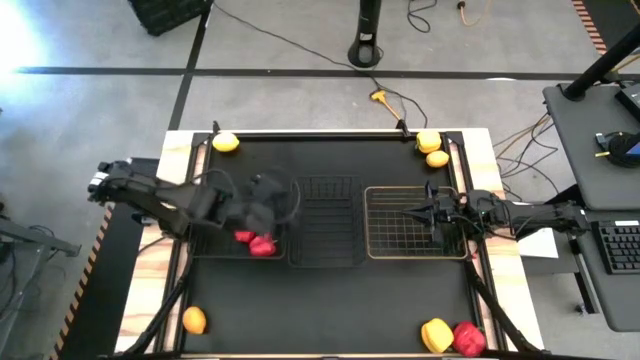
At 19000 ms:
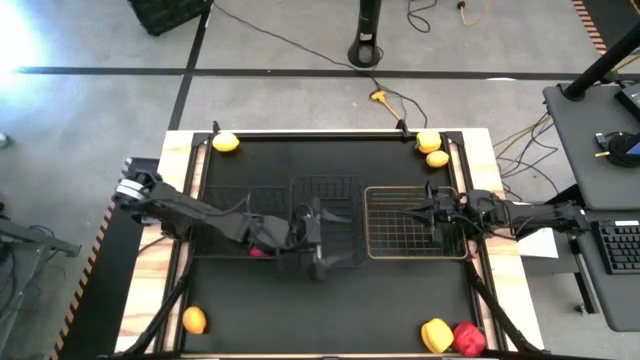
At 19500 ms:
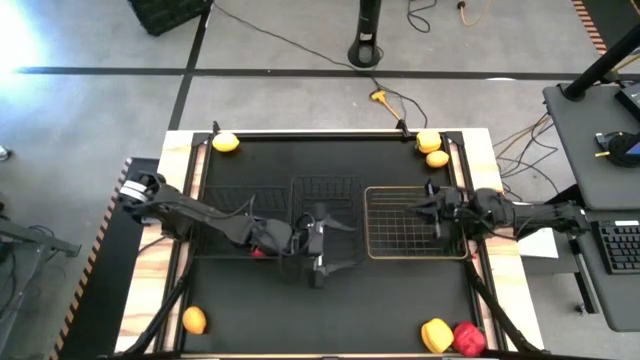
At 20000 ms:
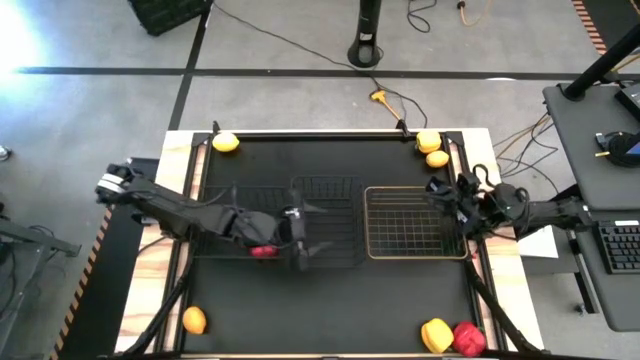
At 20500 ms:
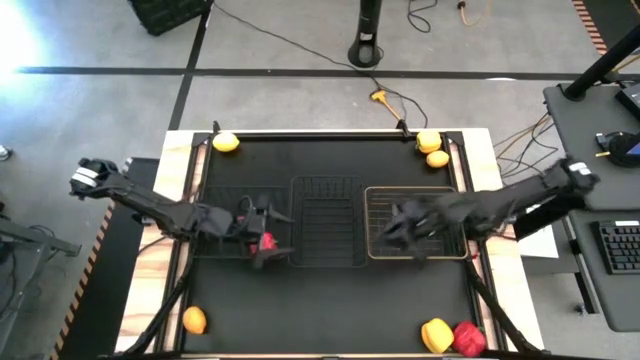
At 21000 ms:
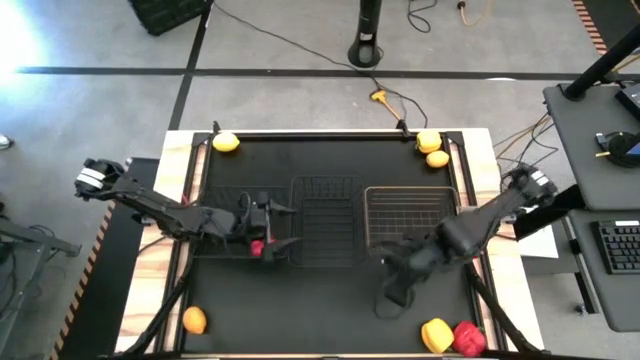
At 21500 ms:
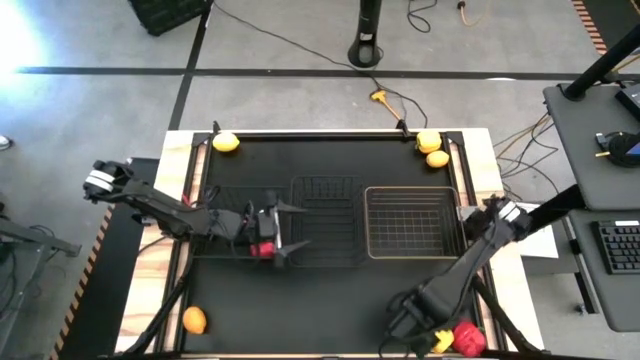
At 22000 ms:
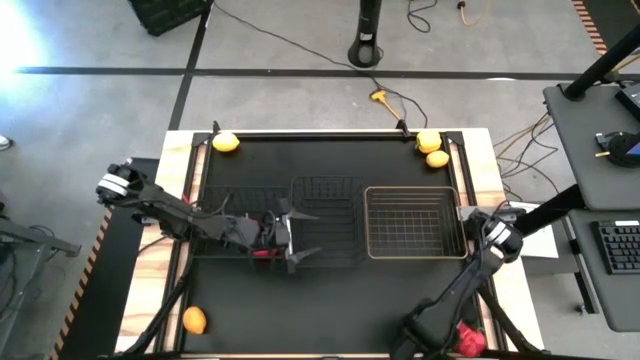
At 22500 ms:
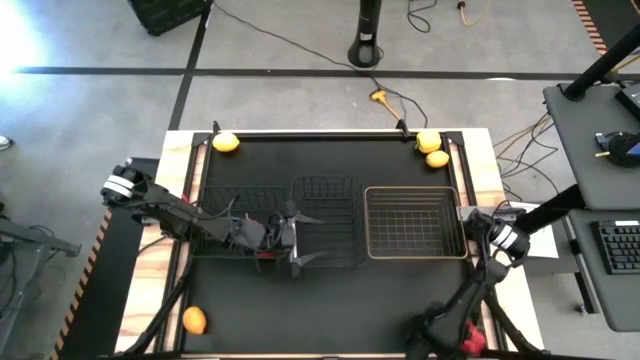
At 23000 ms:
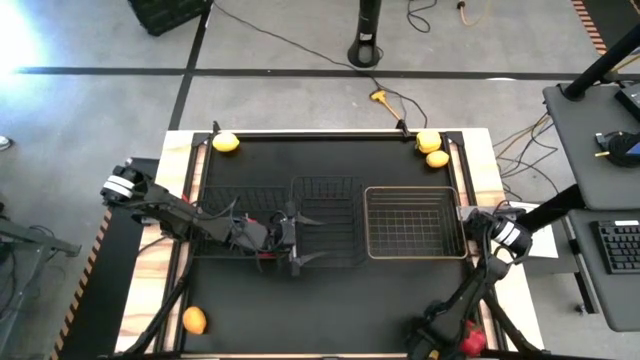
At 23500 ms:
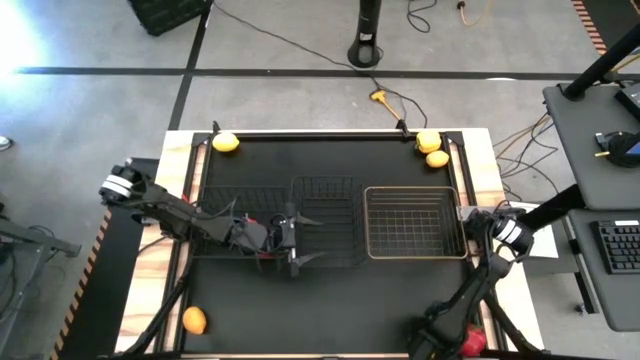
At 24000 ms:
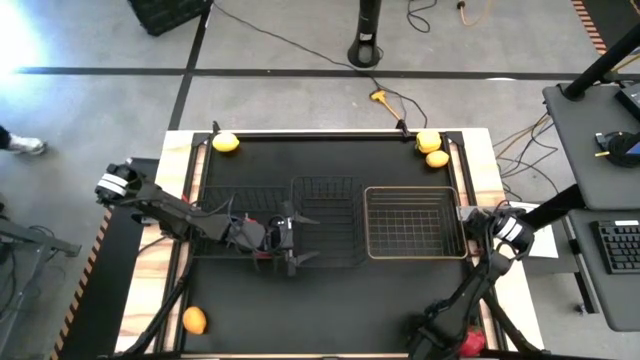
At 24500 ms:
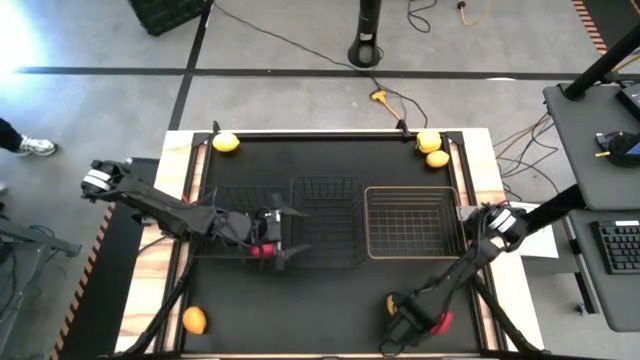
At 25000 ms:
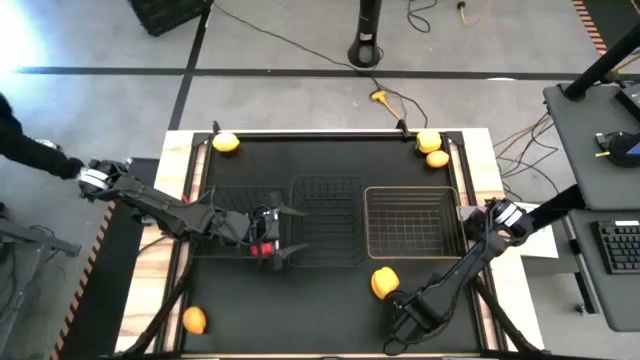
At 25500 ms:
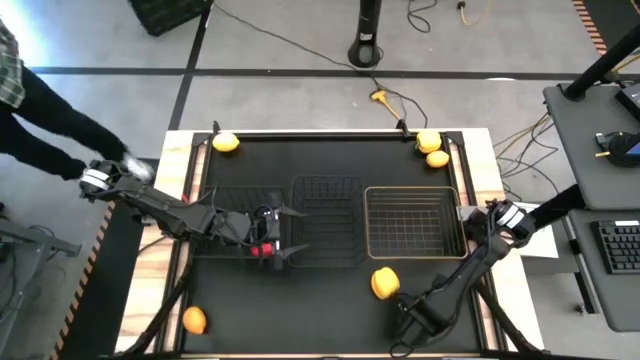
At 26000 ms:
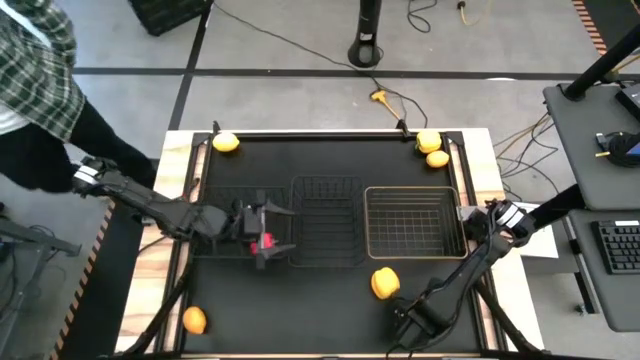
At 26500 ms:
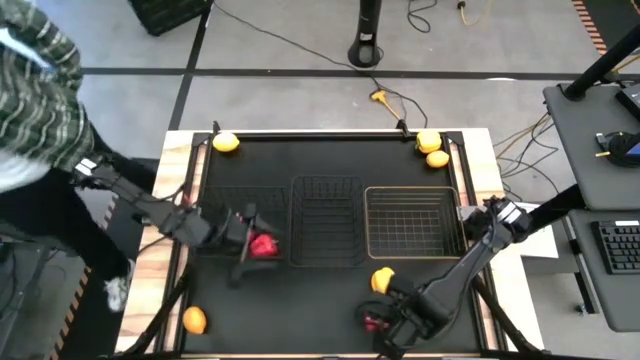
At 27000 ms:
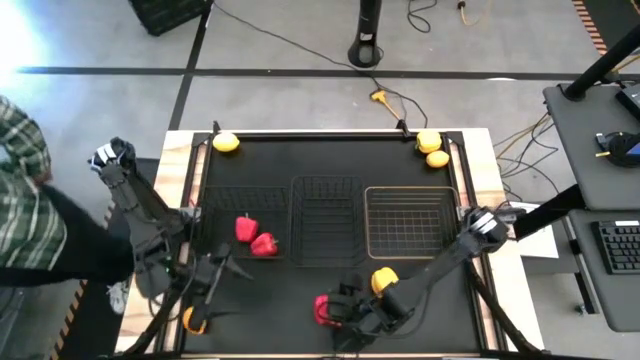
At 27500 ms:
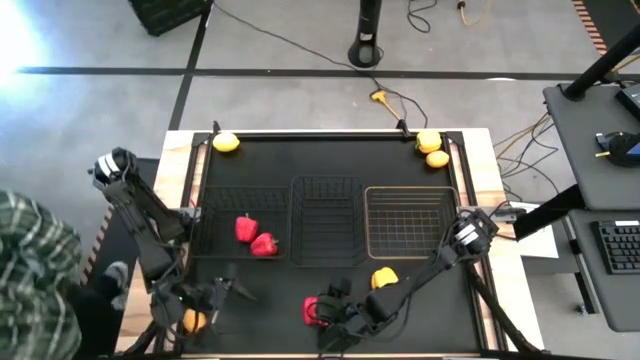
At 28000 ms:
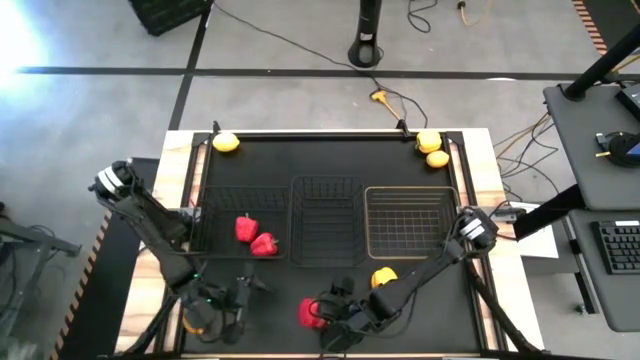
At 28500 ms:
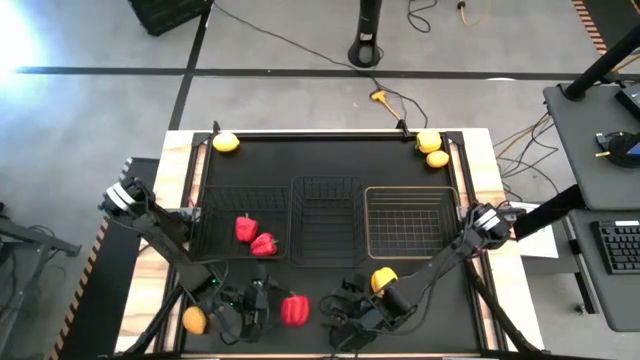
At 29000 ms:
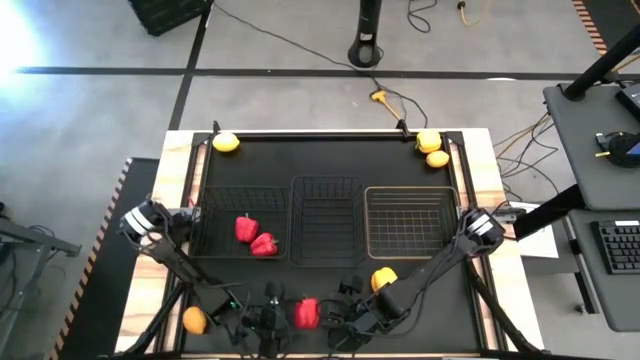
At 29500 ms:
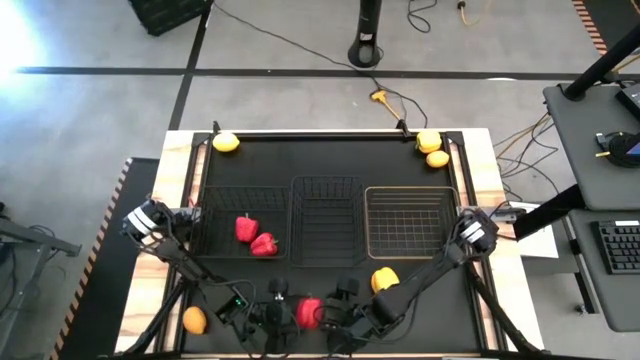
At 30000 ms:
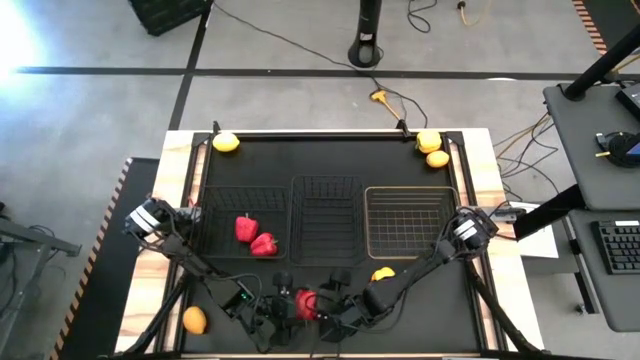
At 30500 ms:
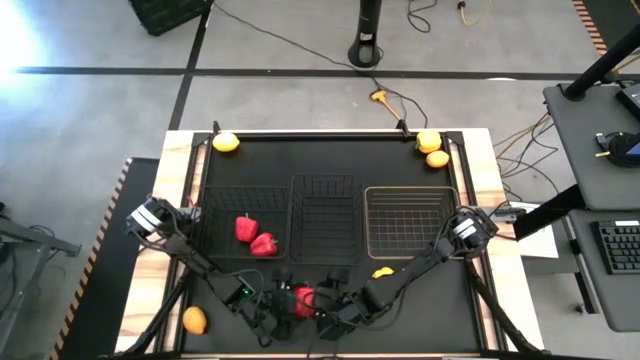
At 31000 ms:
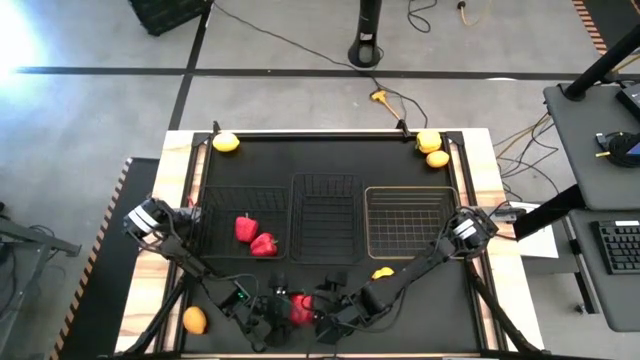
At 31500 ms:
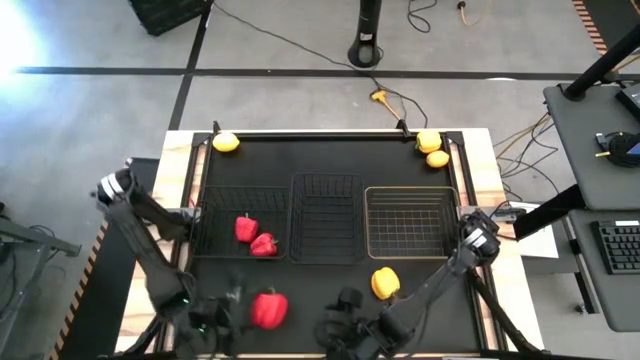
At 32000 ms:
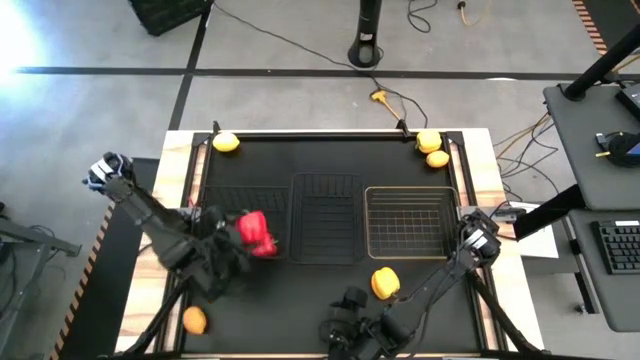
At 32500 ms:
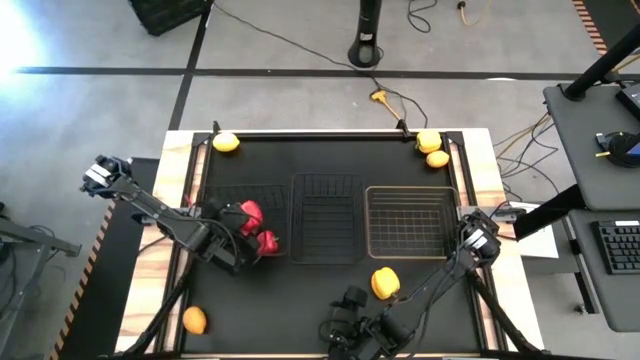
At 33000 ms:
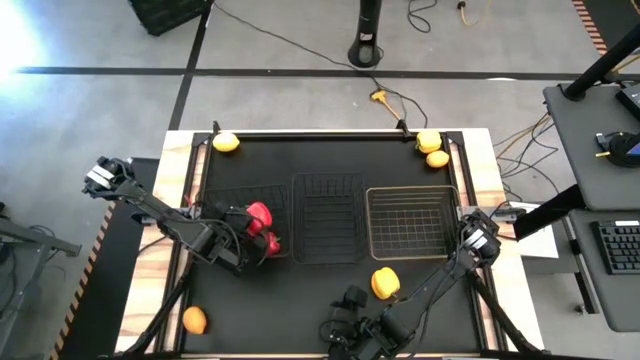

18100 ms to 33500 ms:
Task: Sort produce into baskets
Put the red bell pepper into the left black wire basket

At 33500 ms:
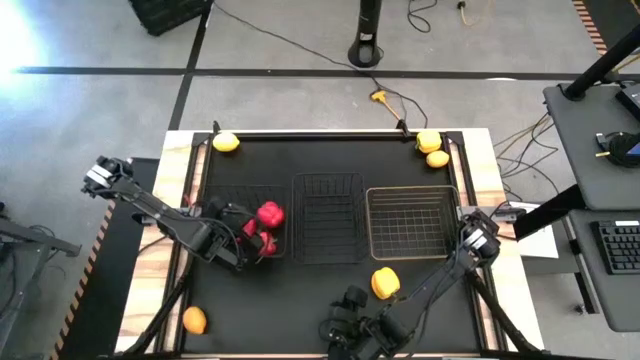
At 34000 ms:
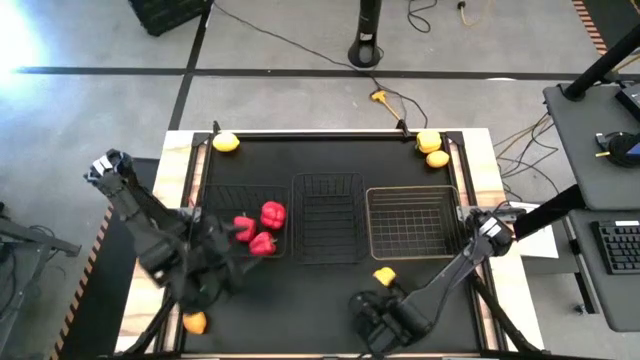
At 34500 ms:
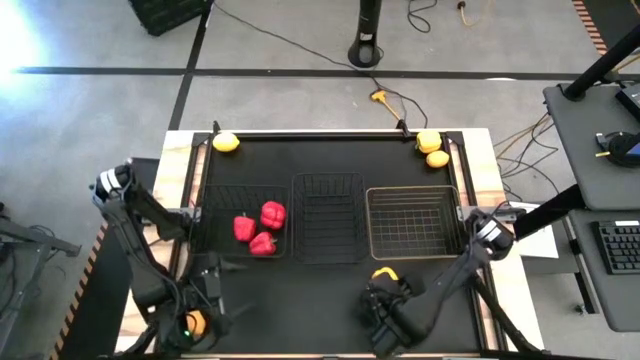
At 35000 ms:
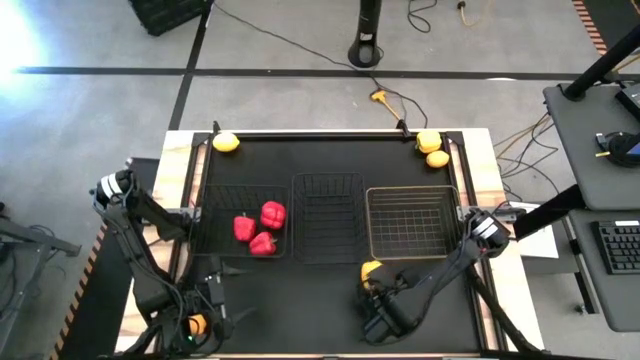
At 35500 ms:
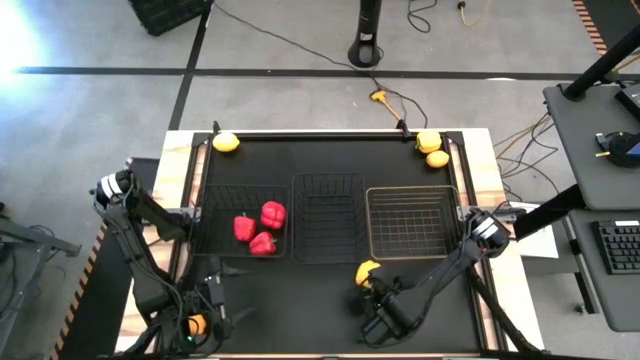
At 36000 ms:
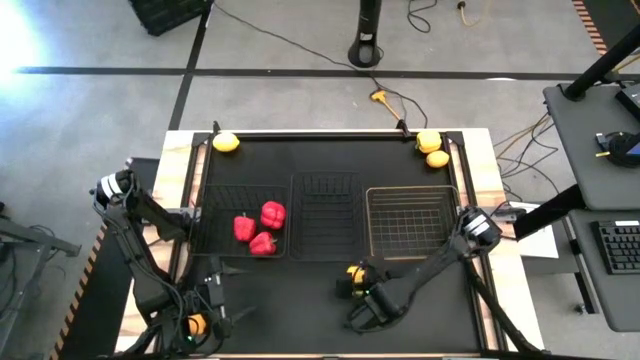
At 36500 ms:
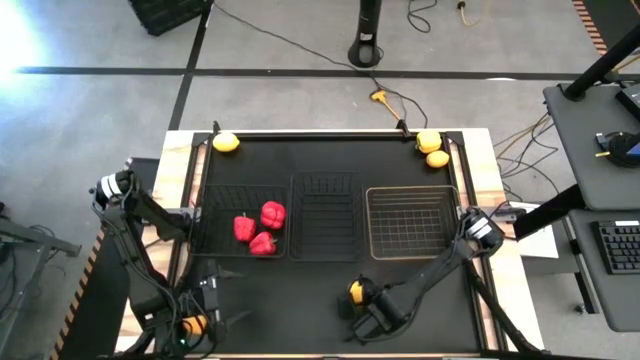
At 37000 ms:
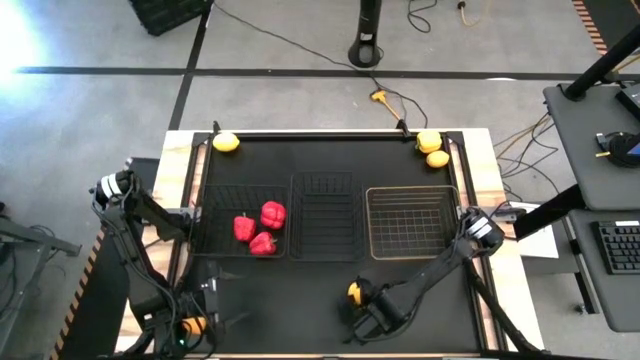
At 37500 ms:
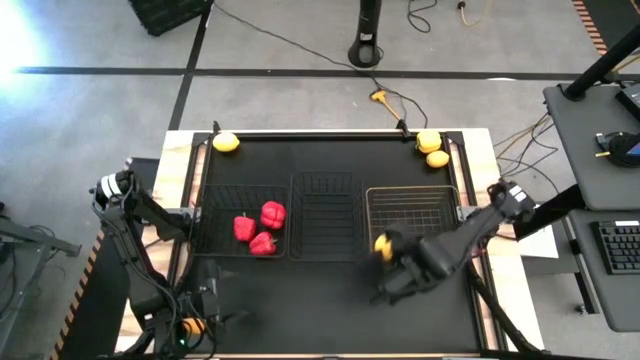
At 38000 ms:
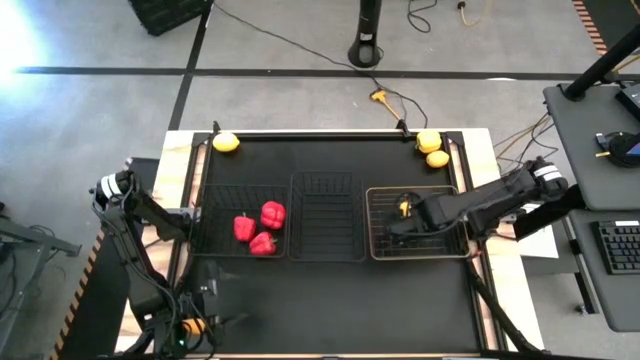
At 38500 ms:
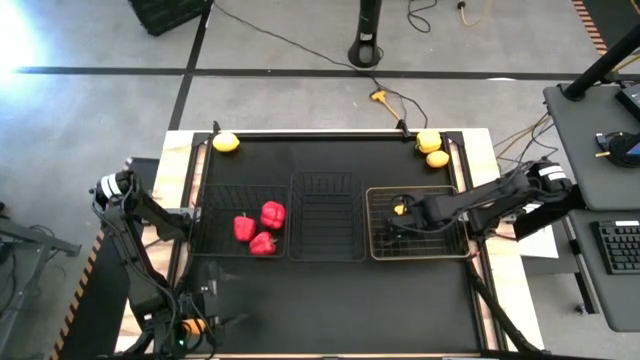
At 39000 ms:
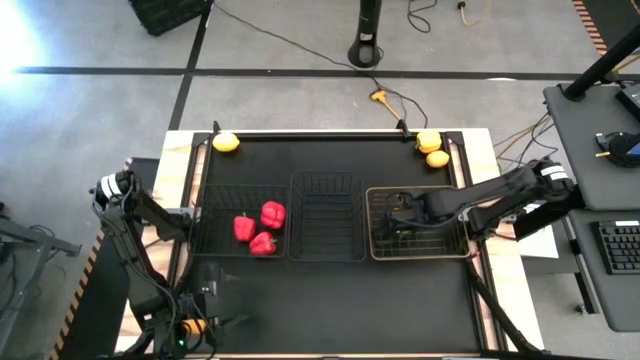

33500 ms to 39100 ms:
Put the bottom yellow bell pepper into the gold wire basket
